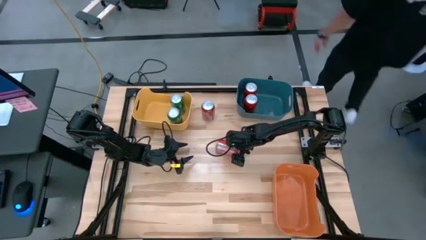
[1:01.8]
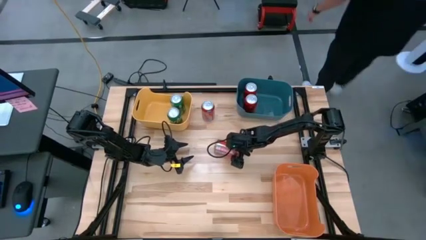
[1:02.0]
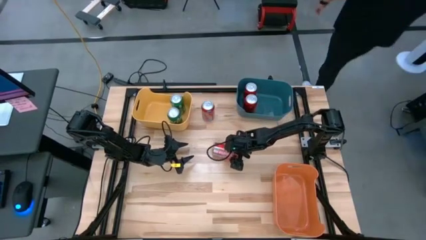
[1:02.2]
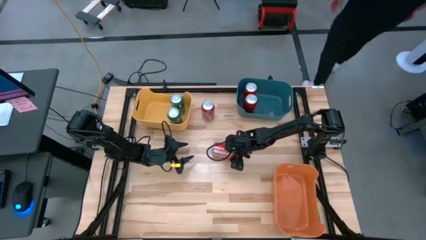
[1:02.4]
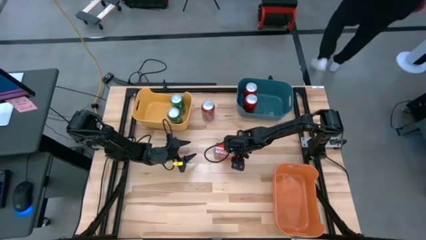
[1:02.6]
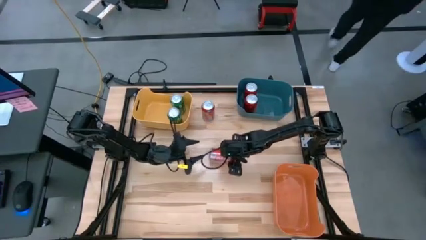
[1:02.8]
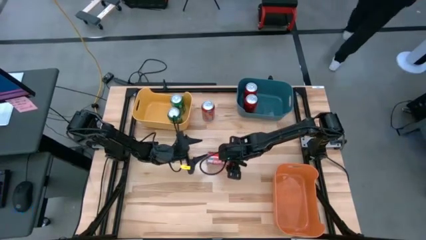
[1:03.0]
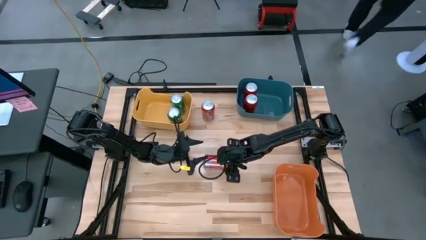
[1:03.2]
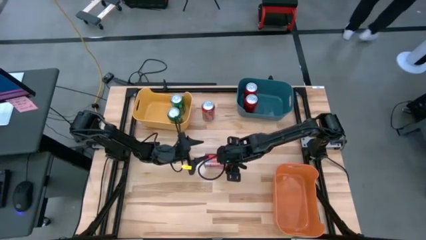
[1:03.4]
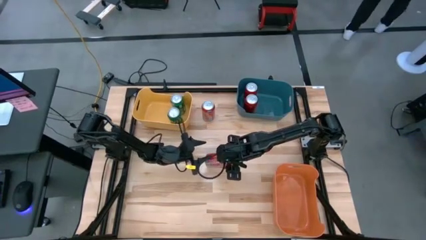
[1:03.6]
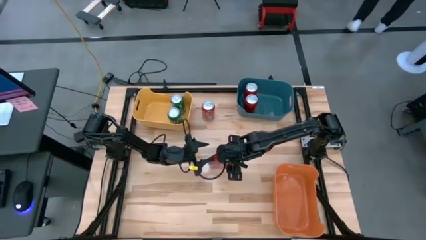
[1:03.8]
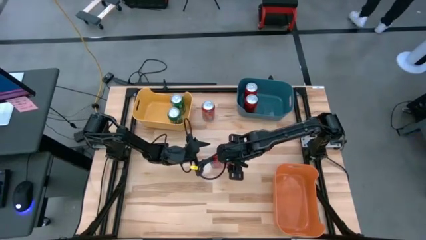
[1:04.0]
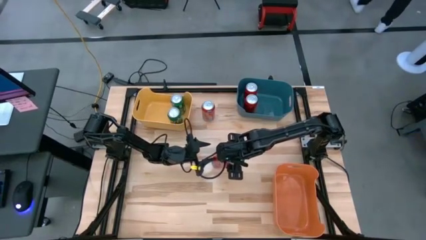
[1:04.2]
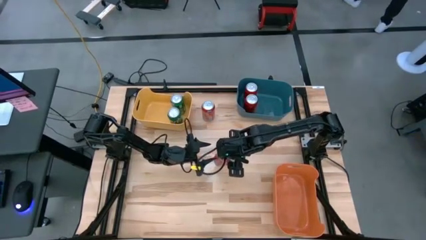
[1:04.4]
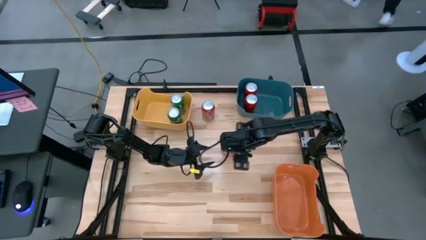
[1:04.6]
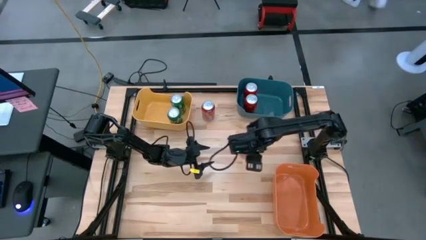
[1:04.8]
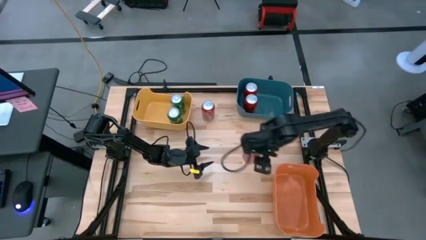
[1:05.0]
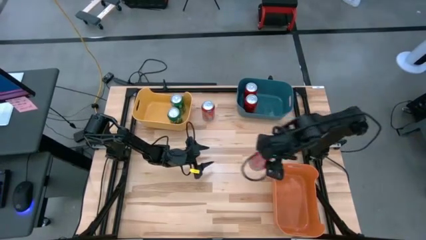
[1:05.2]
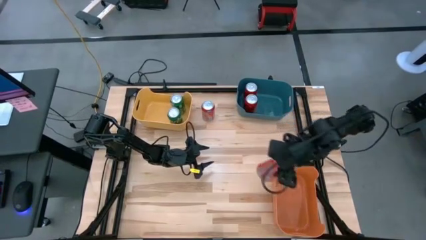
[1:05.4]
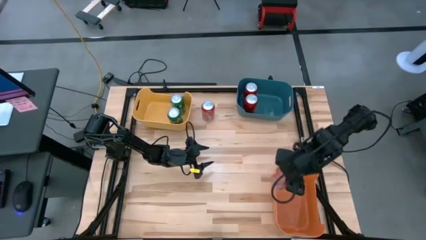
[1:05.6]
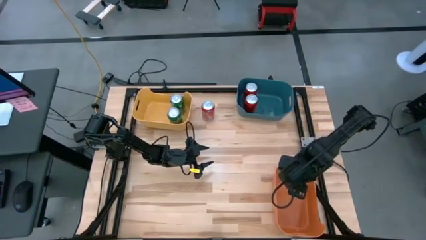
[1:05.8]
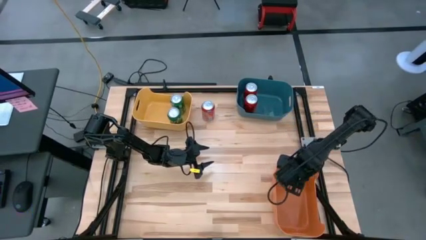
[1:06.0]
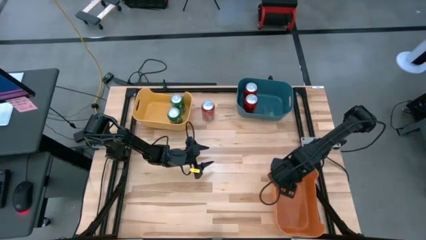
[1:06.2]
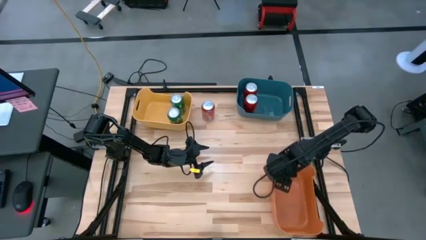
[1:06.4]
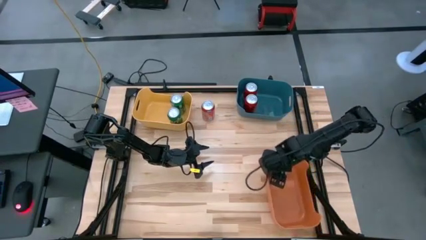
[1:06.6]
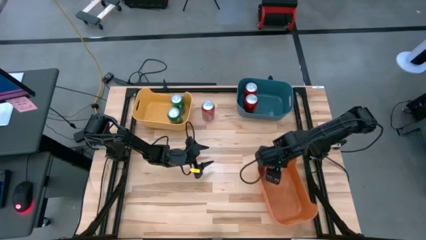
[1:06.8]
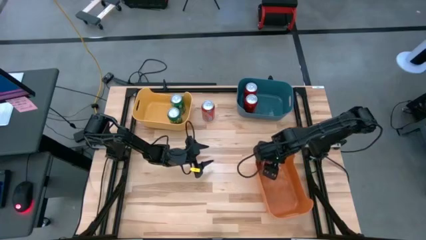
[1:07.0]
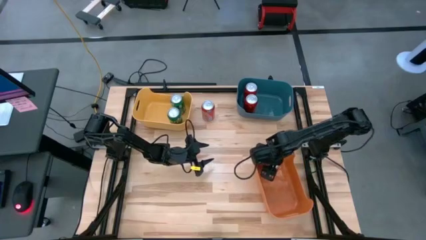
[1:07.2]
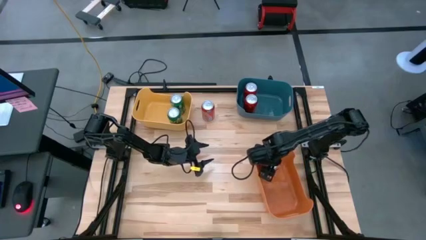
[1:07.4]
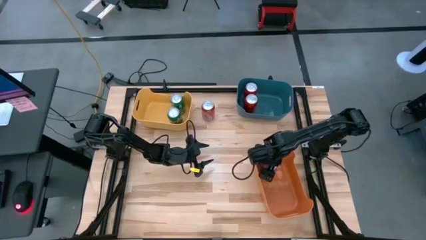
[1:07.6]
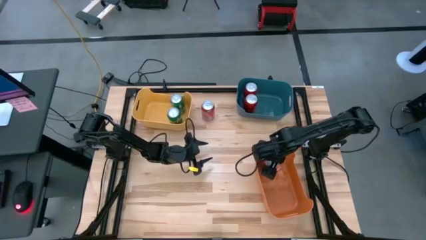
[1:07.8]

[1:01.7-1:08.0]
Task: Sort soda cans
Put the right red soda can into the orange bin

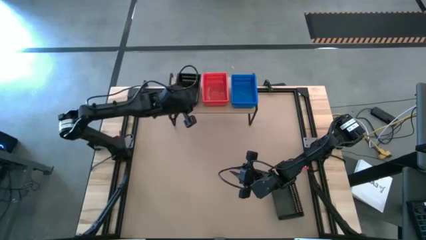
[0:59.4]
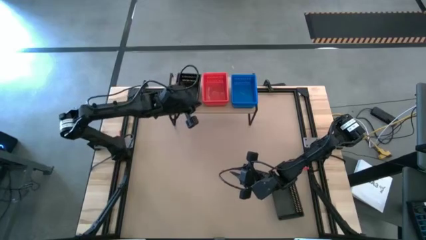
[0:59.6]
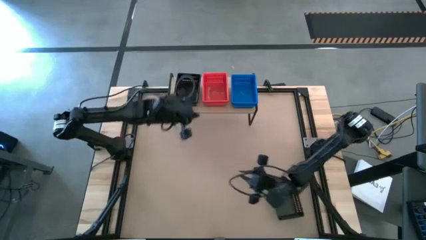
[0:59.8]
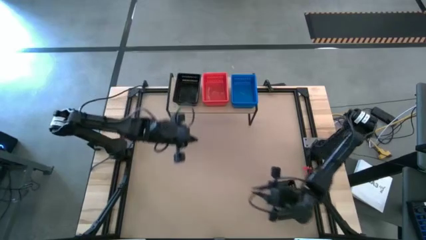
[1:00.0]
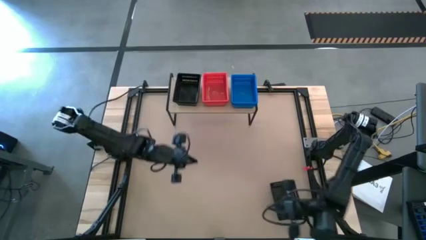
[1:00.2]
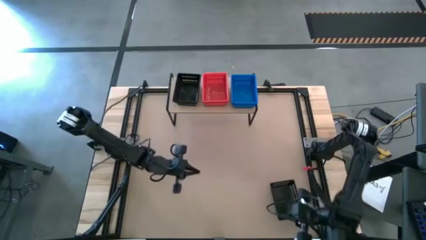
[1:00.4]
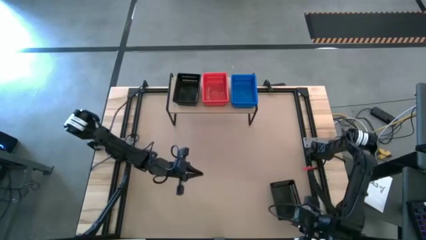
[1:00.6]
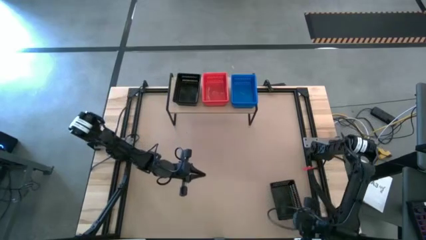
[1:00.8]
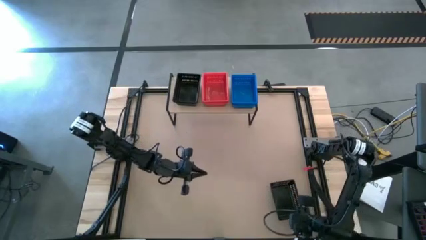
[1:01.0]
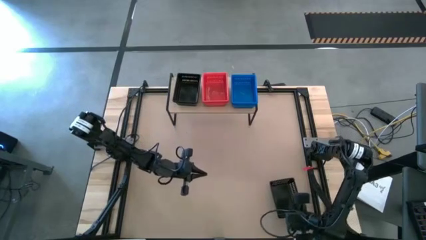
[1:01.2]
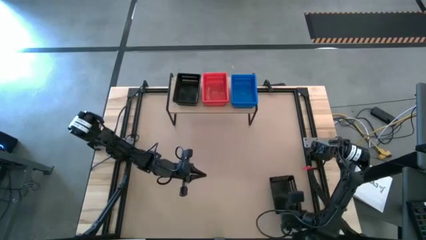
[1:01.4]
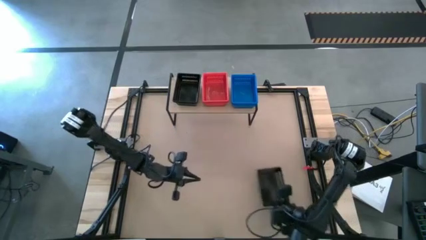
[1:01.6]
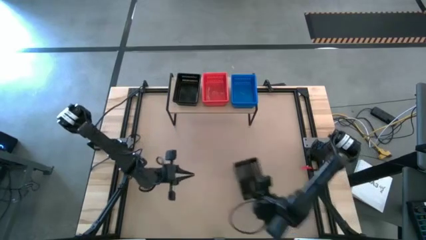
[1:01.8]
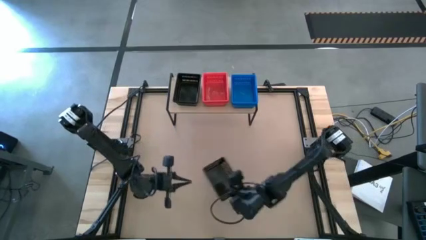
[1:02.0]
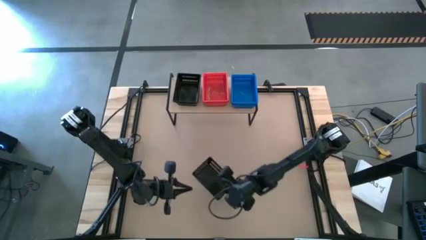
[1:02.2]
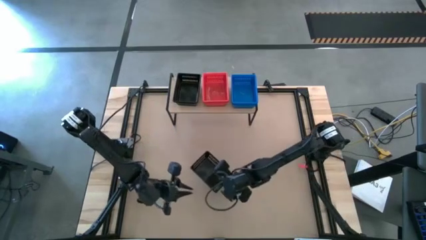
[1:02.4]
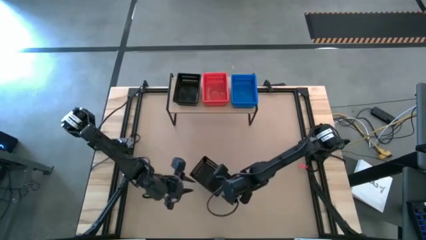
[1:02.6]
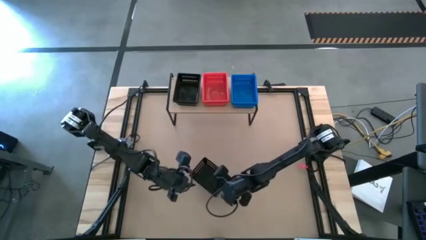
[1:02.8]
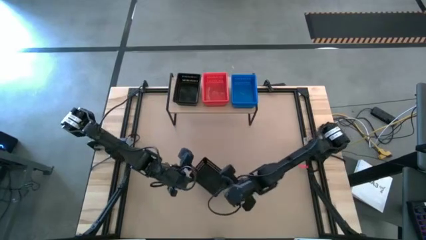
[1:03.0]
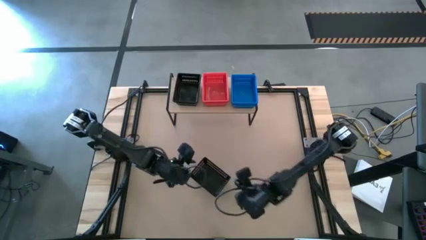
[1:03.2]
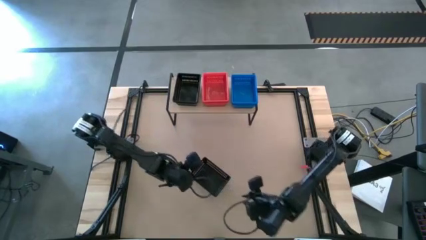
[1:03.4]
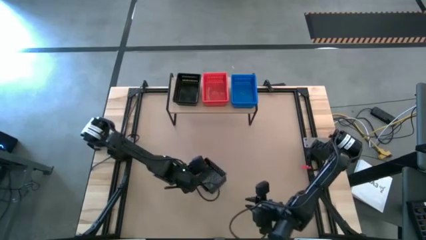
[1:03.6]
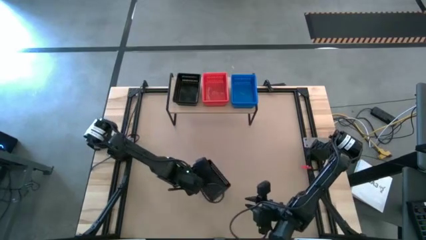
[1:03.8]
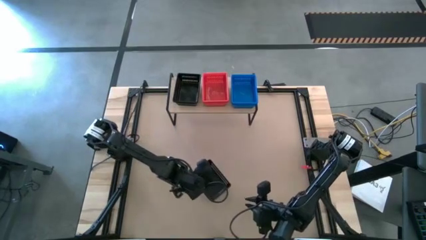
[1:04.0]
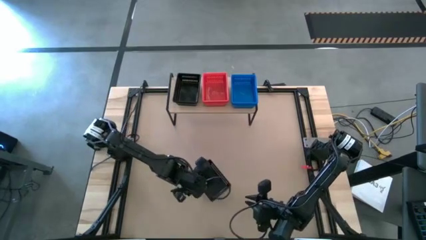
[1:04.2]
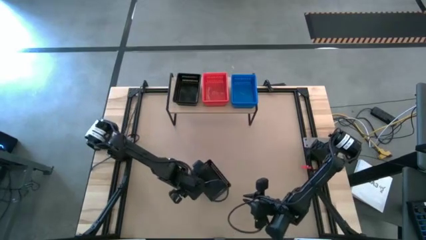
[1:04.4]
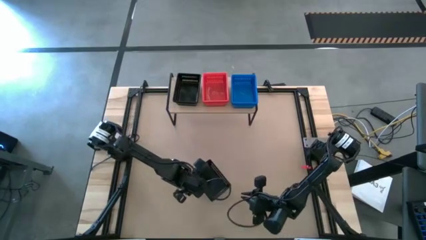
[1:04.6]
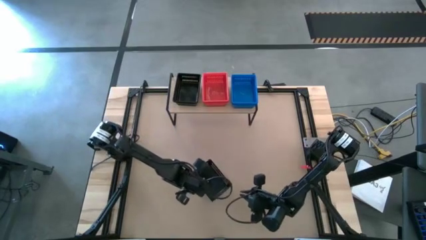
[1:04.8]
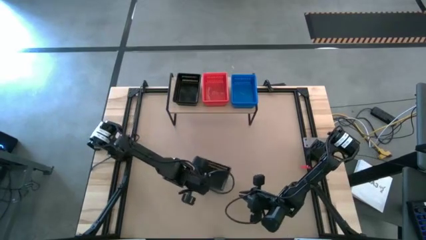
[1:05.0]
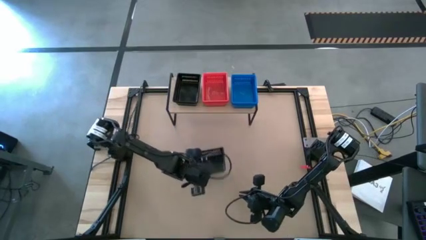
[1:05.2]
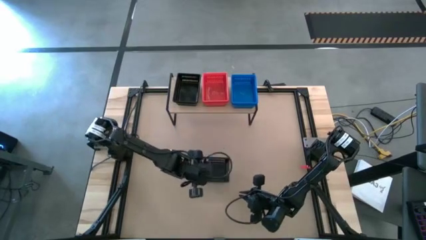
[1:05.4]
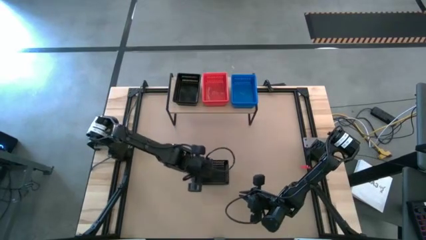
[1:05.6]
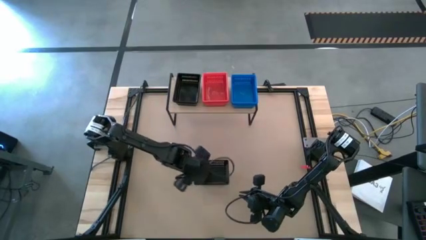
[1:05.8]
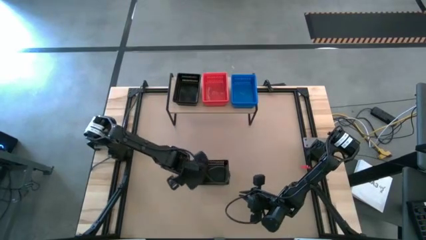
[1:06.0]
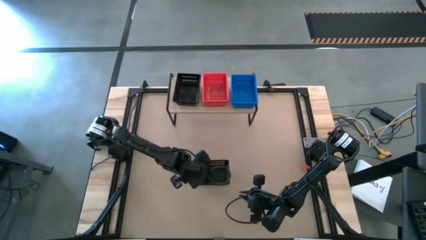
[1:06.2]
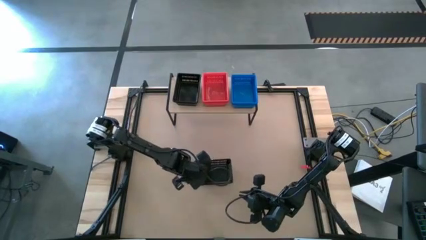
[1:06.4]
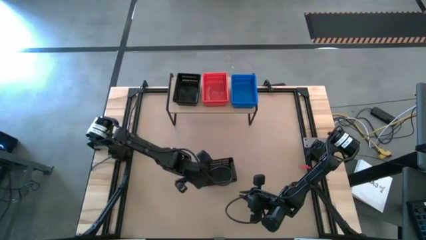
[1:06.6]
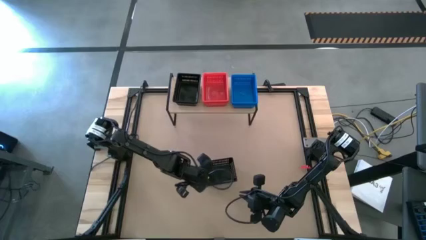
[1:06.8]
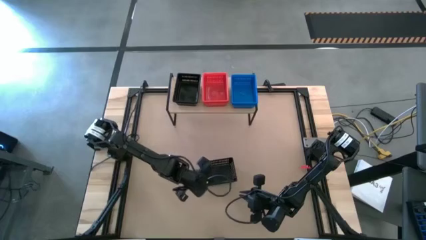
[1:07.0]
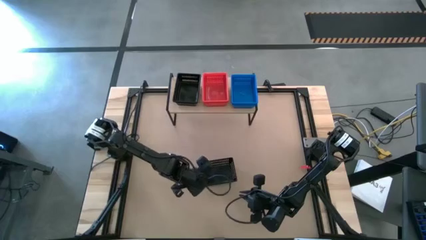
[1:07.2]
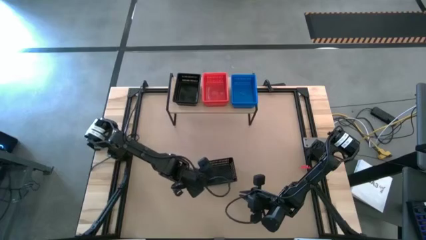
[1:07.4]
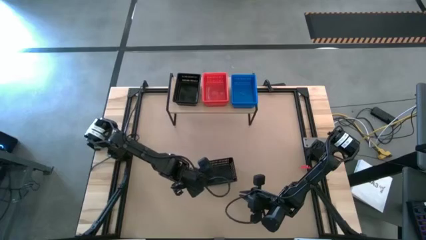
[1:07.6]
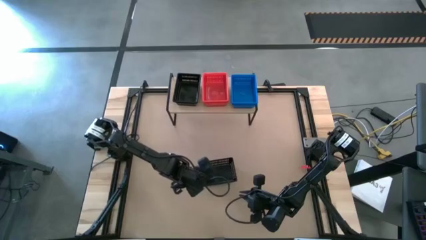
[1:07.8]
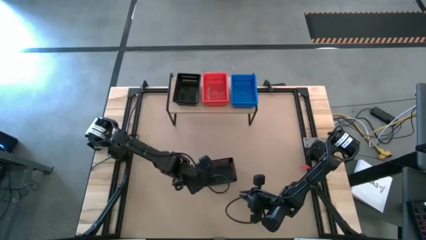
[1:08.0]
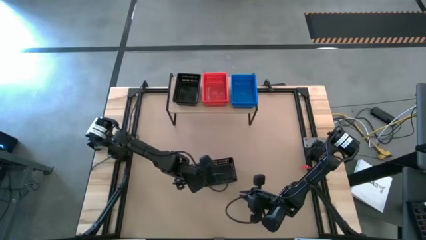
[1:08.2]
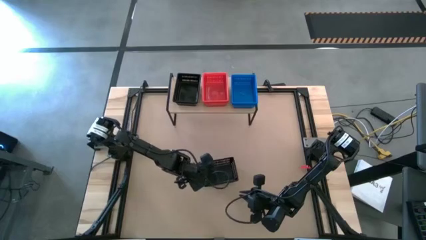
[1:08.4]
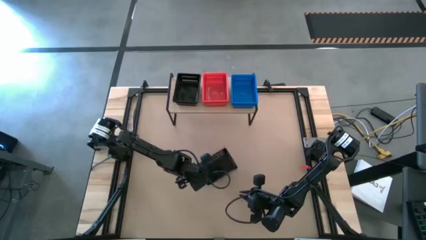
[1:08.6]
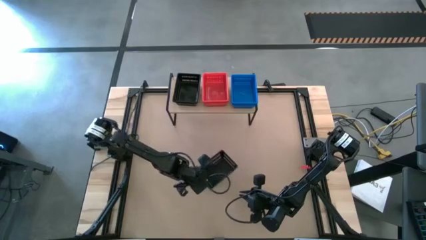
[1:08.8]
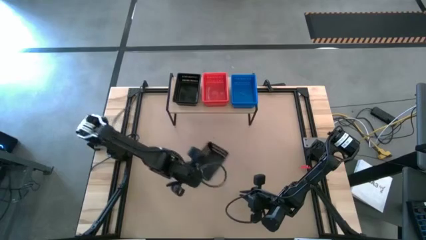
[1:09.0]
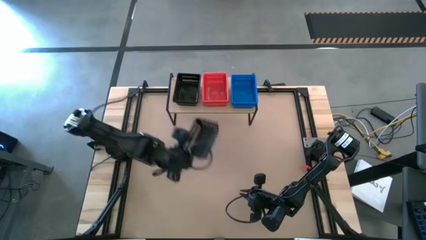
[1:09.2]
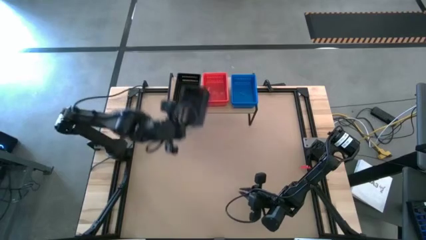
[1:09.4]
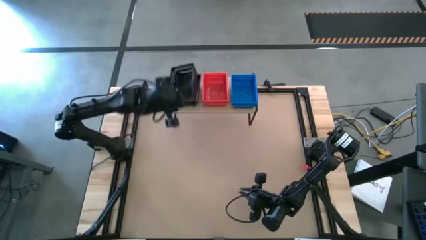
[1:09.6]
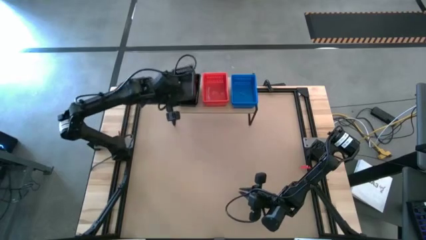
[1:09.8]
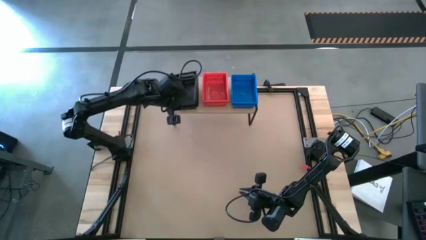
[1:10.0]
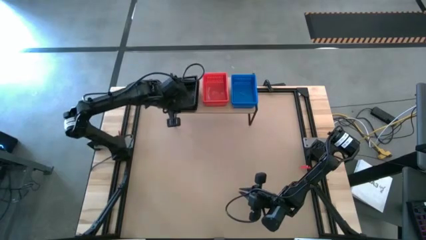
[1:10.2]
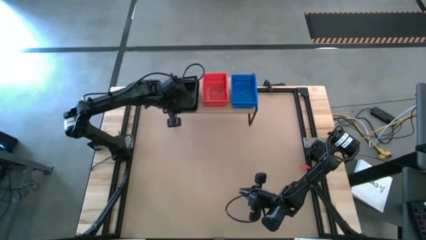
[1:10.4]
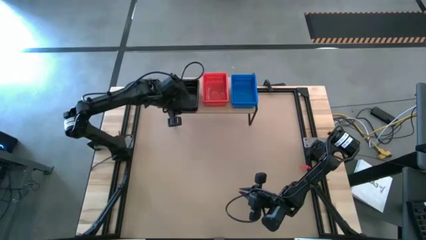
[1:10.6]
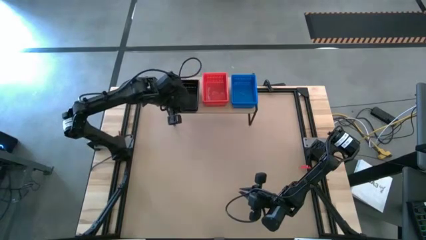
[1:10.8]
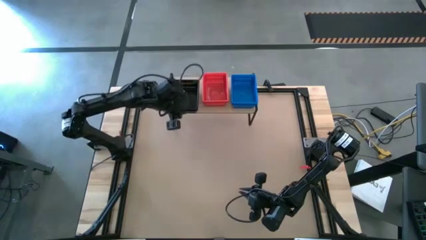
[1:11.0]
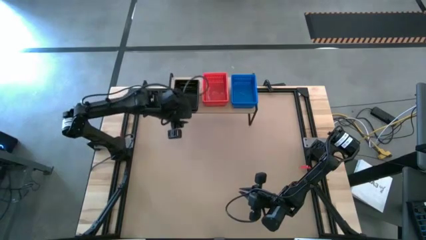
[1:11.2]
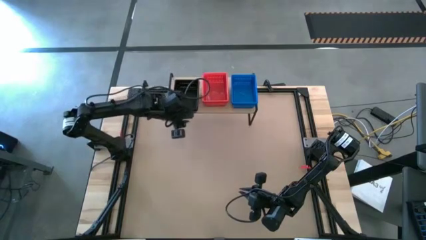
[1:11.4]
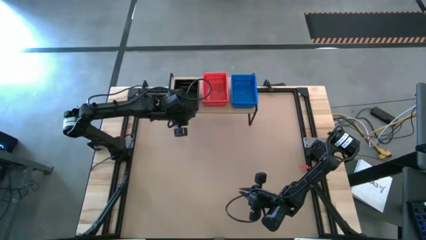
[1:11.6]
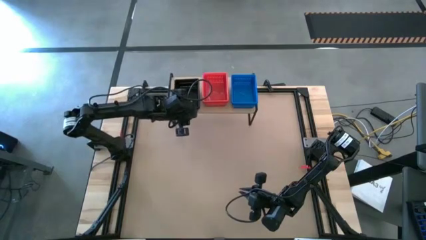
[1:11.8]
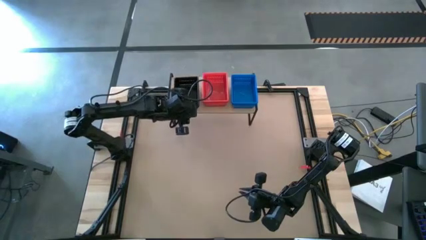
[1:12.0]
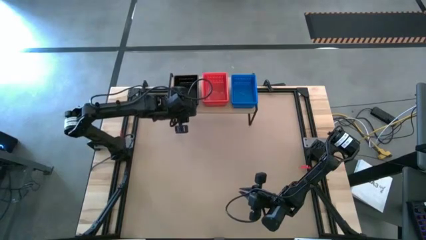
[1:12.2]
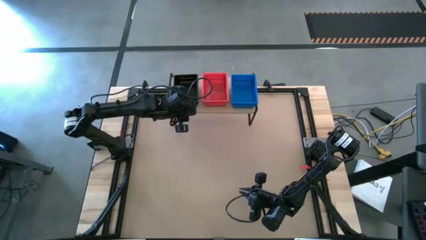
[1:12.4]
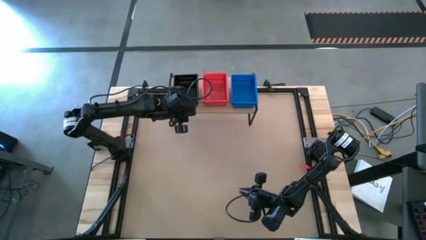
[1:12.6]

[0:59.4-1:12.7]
Task: Stack baskets on shelf by color
Stack the black bin on the black bins on the shelf
